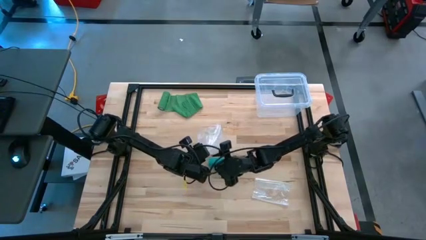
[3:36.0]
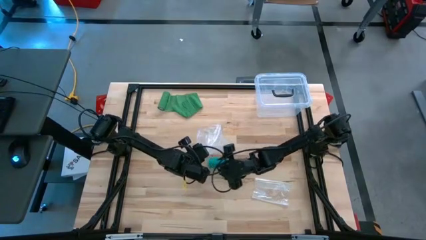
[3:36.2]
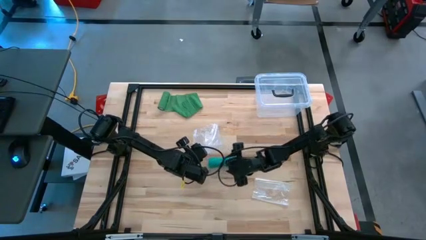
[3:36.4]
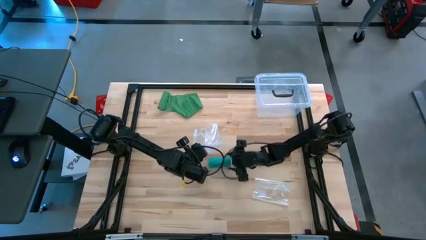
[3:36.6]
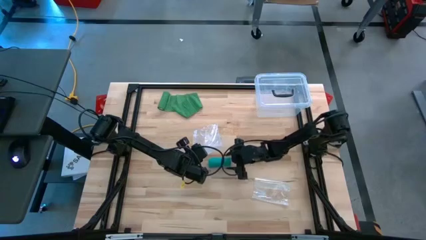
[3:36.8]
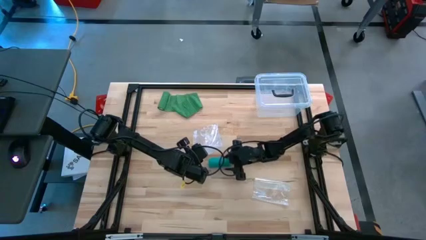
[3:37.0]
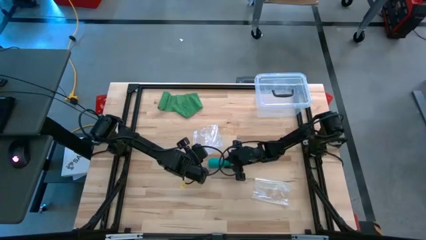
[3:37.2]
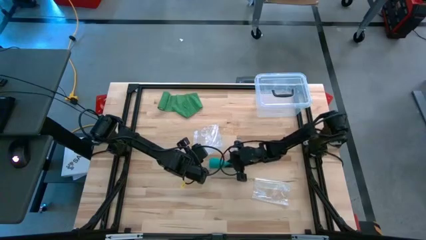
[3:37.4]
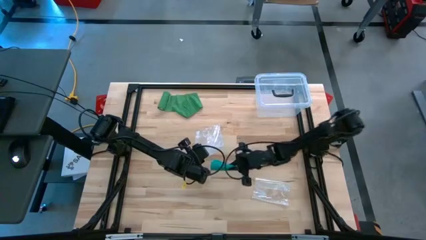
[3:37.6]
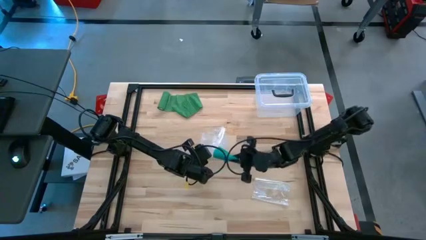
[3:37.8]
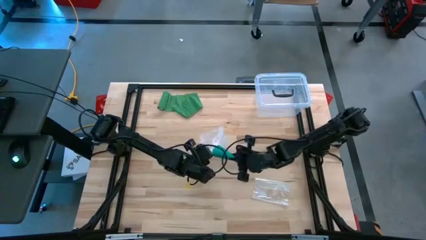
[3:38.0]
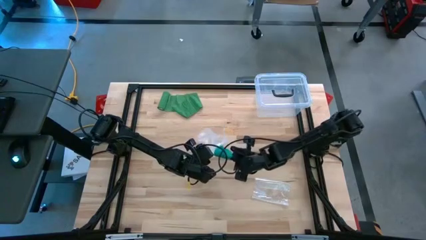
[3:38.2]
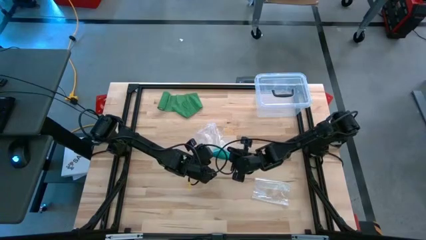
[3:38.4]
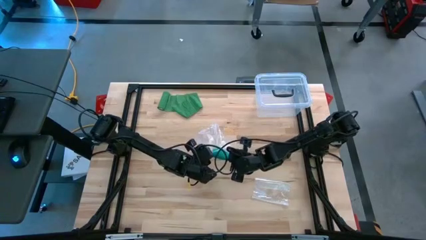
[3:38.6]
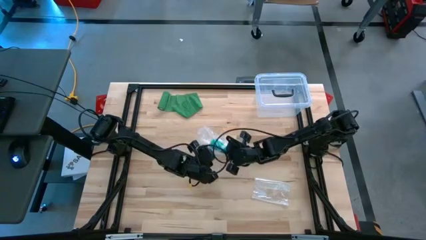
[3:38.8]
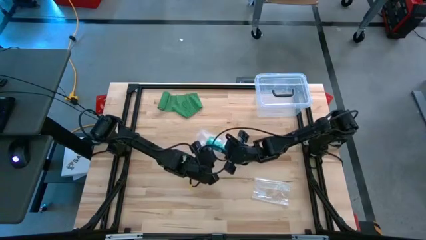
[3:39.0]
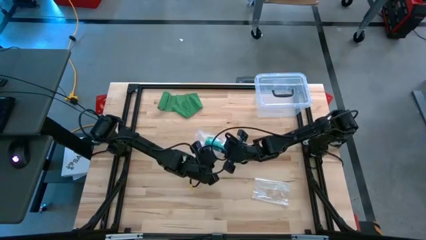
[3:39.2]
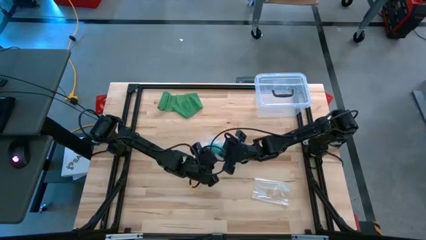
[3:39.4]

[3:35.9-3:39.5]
Task: Roll bandage
Put the rolled blue bandage into the transparent zip bag

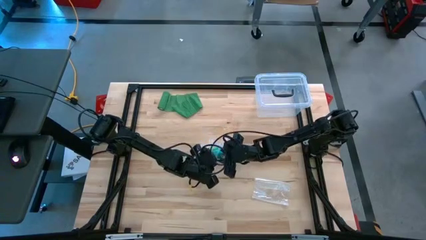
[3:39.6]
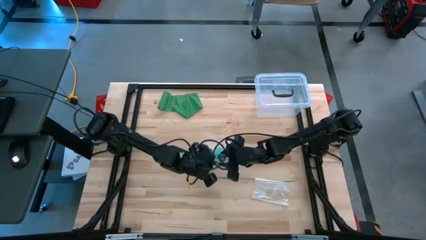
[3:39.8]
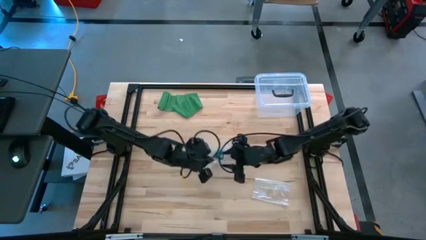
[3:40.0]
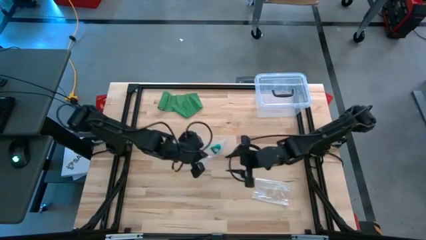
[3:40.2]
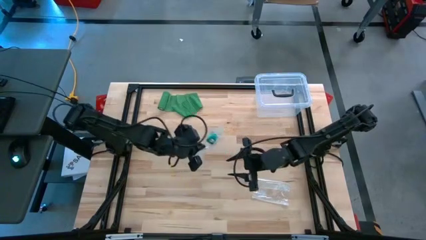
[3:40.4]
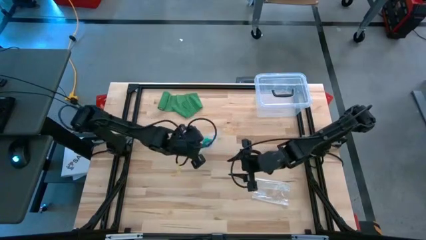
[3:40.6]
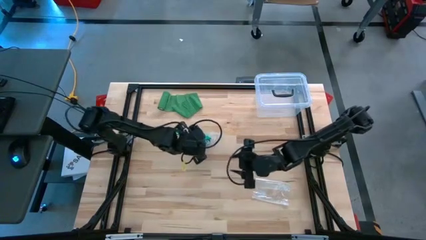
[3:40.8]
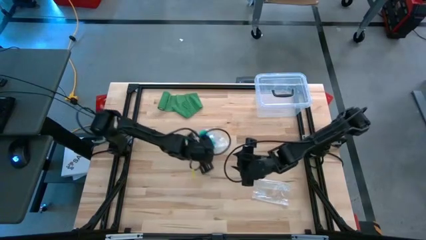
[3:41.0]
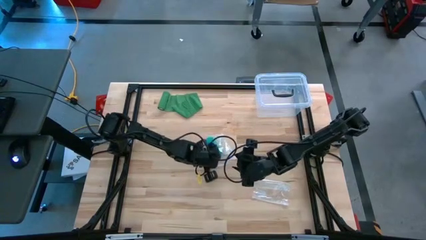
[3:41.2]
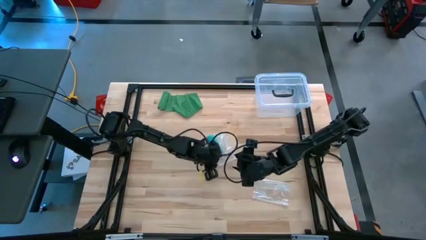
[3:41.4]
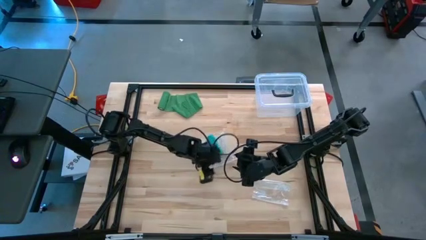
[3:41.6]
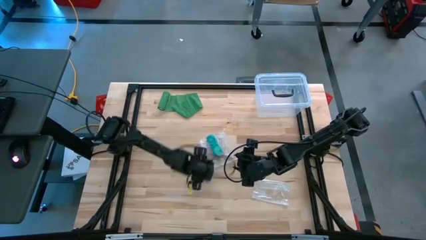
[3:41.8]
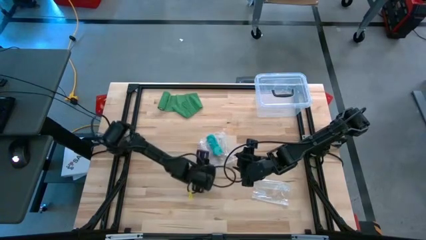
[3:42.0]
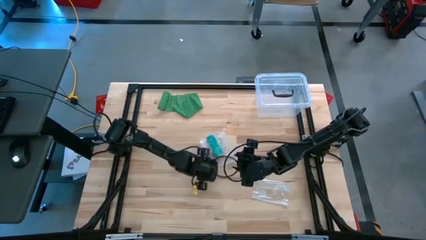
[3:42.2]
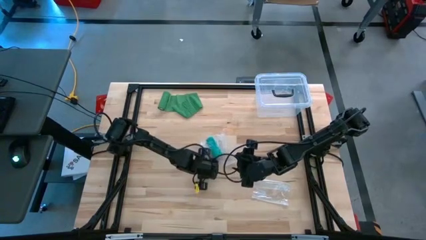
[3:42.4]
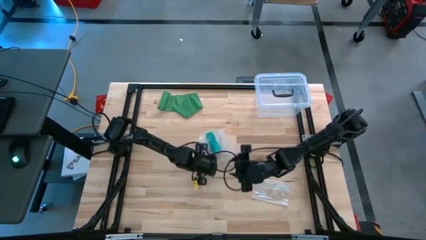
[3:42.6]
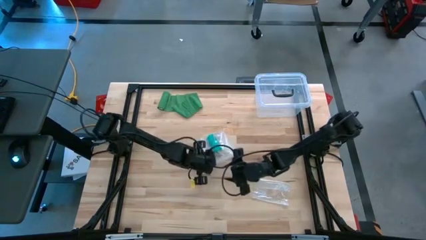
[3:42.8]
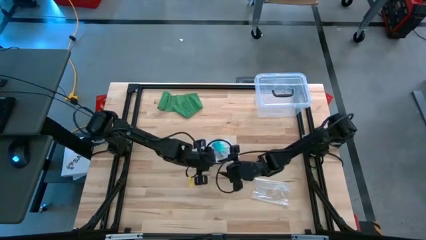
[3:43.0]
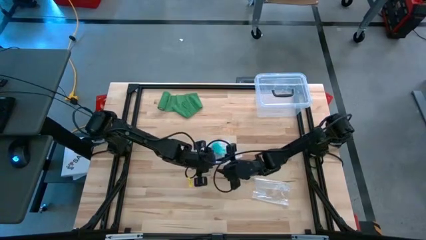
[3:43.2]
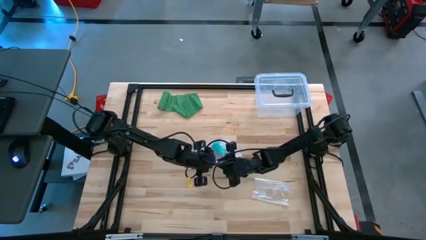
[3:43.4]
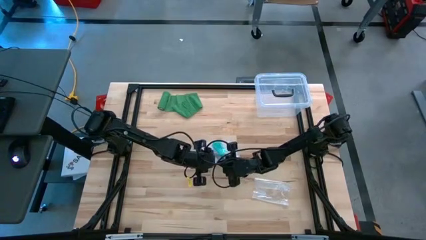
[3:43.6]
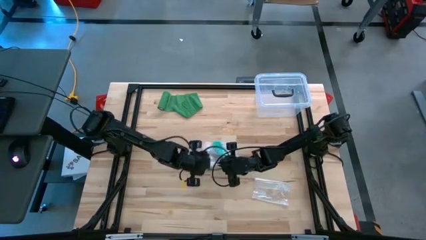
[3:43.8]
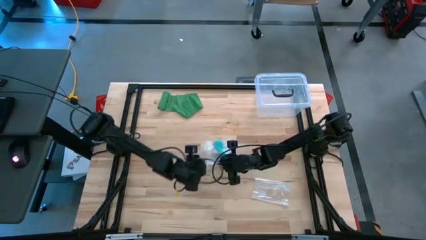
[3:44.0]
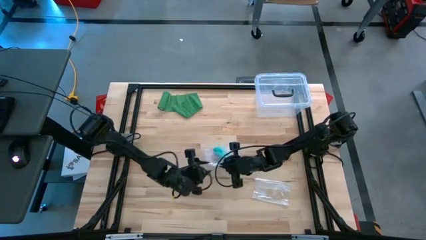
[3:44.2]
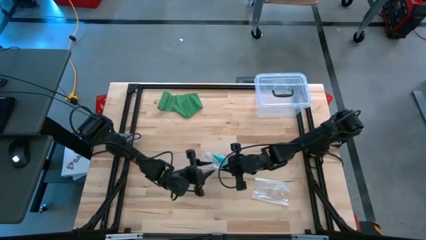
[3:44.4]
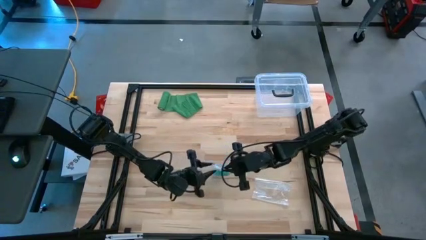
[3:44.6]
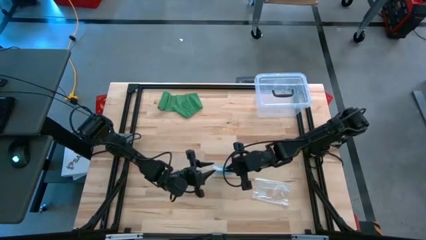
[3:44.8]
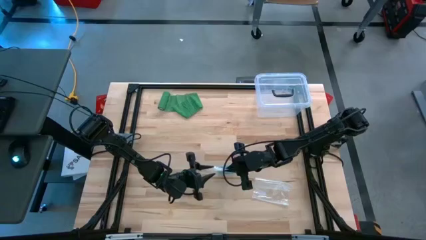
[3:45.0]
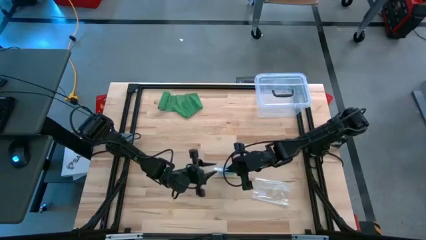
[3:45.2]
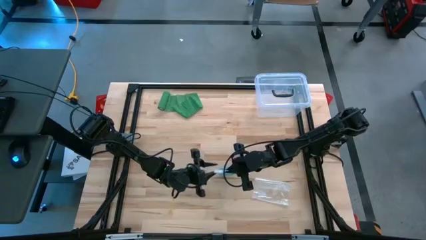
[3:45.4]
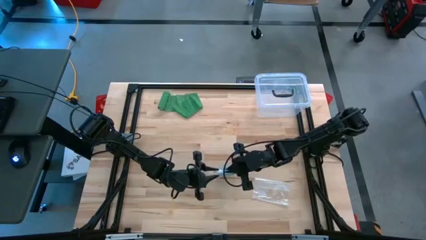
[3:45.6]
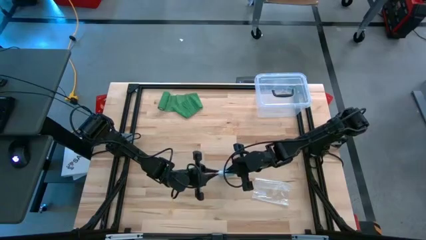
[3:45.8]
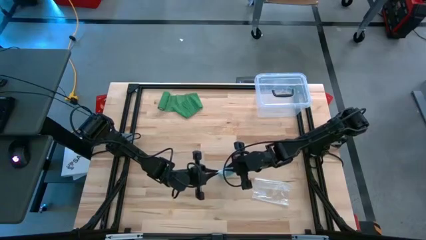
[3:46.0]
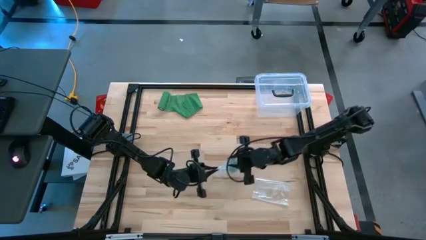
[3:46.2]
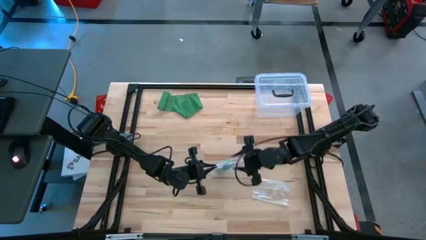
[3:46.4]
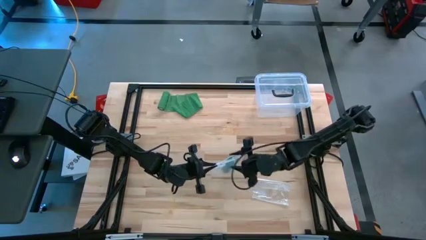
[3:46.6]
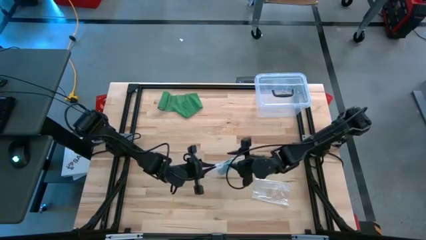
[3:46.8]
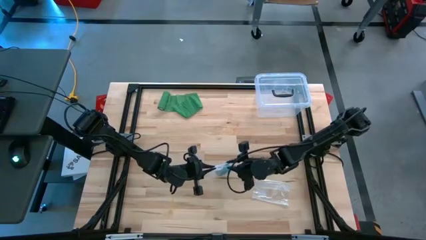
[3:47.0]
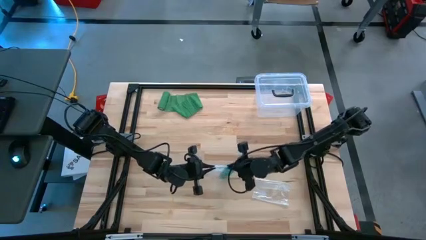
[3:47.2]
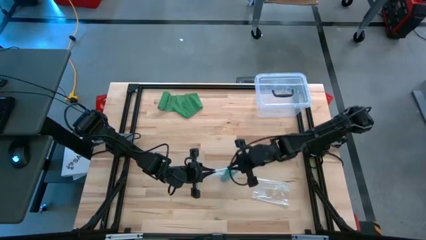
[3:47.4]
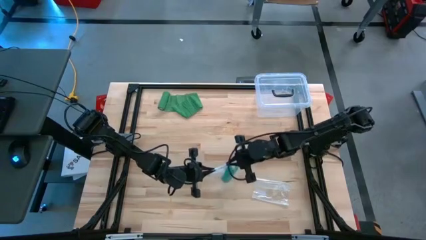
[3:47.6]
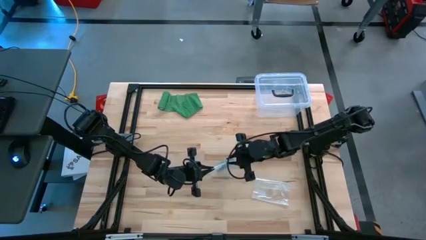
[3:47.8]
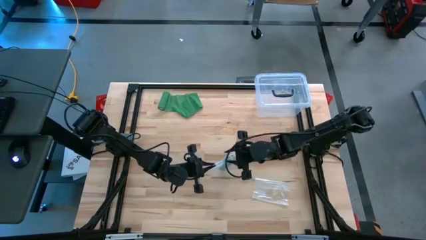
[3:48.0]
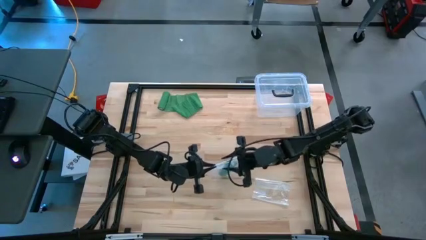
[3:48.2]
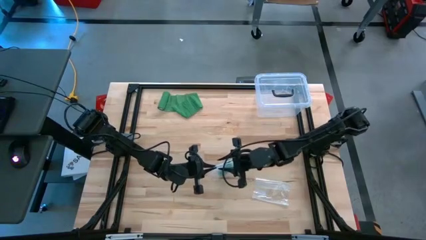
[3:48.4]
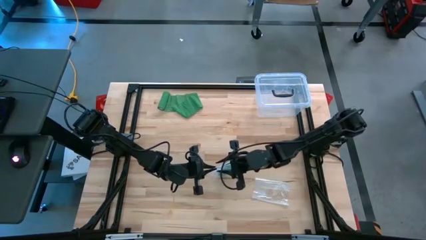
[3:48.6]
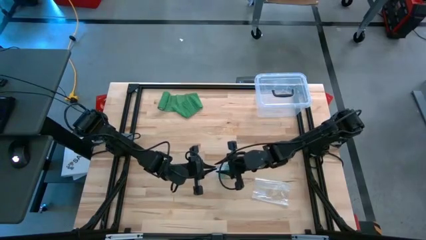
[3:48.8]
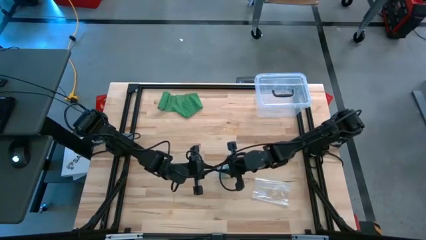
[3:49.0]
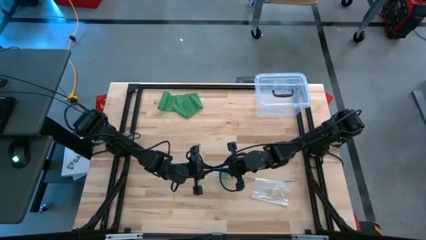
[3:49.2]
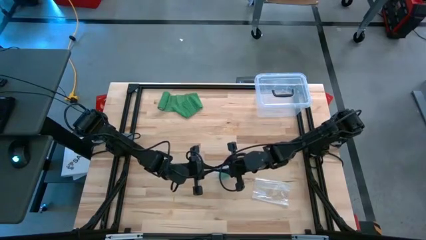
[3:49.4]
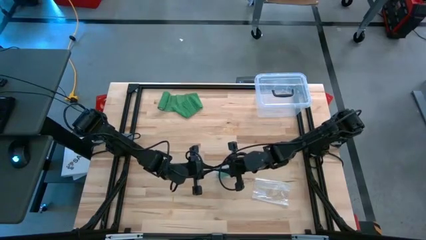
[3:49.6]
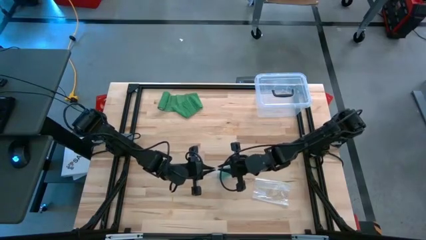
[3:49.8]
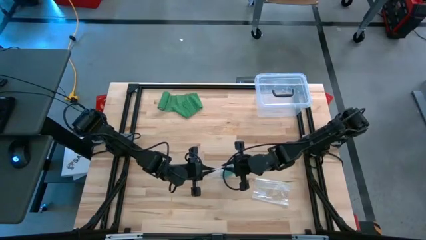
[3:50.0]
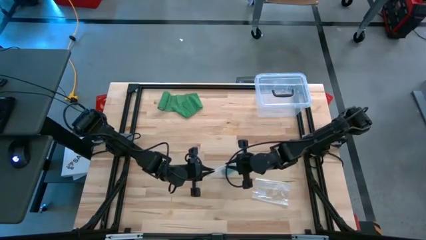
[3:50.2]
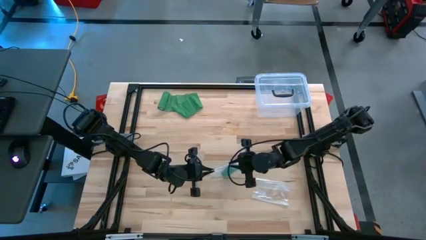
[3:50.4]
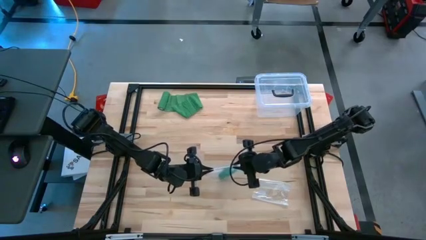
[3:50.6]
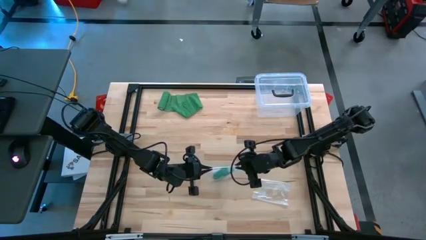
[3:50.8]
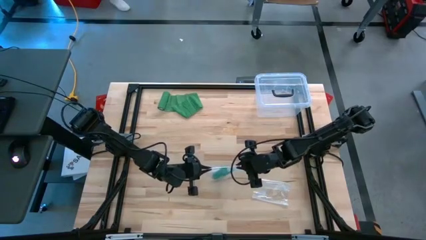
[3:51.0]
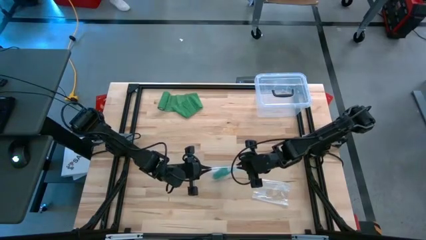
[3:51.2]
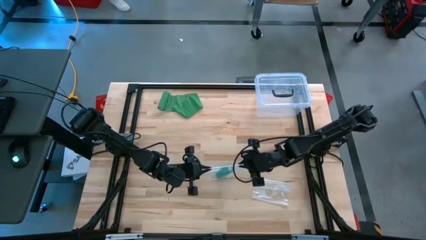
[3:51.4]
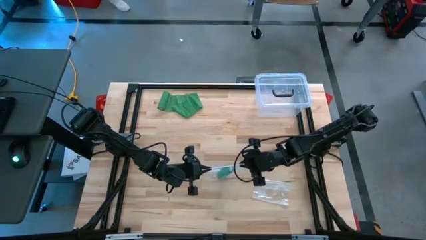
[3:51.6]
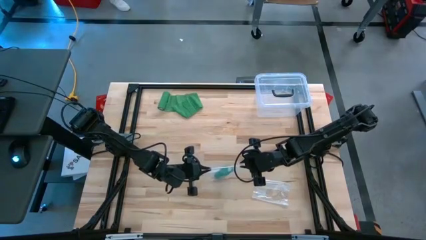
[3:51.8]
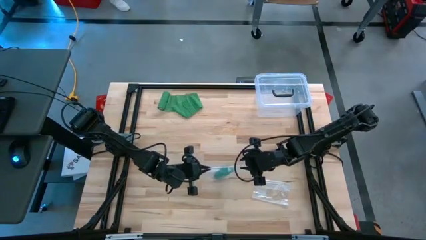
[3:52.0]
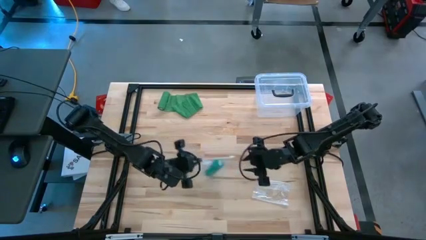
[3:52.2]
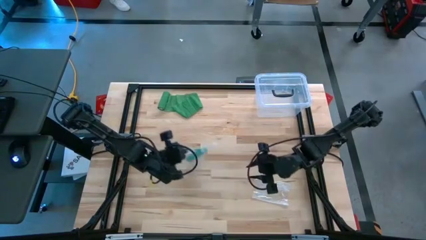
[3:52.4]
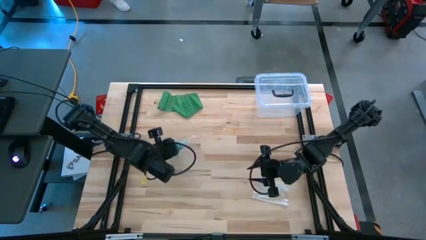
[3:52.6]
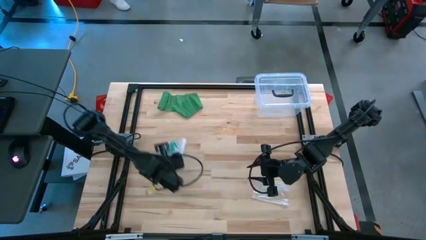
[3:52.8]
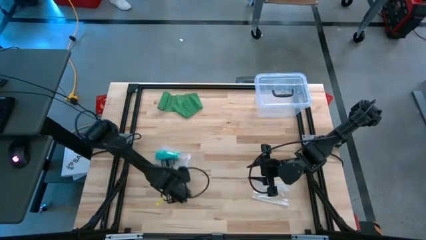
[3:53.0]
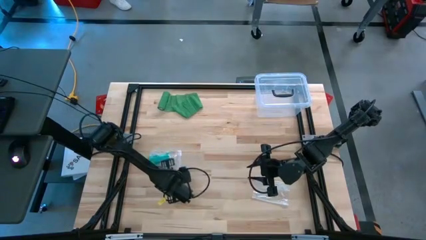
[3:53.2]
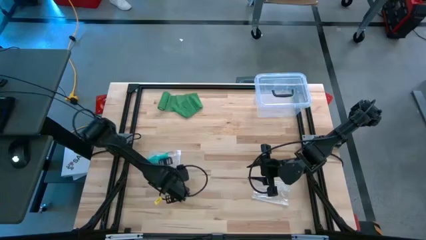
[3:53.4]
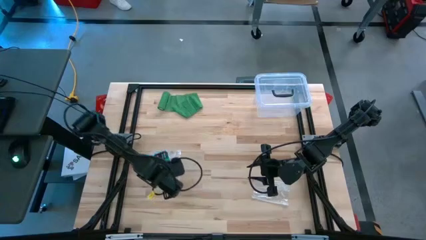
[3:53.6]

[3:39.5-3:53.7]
Close the transparent zip bag
